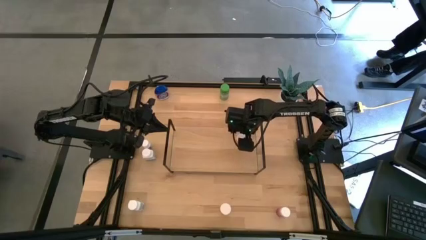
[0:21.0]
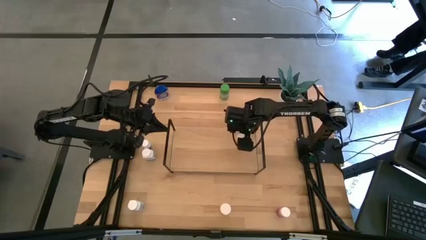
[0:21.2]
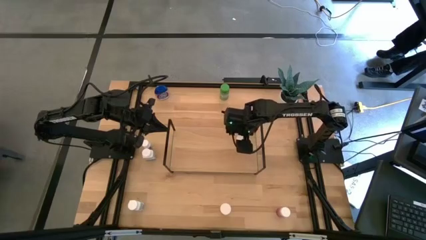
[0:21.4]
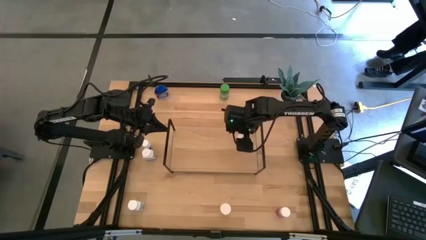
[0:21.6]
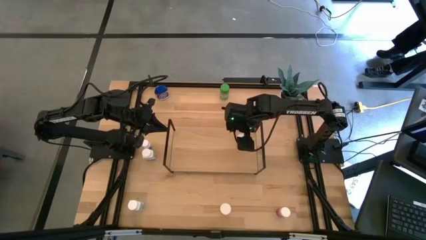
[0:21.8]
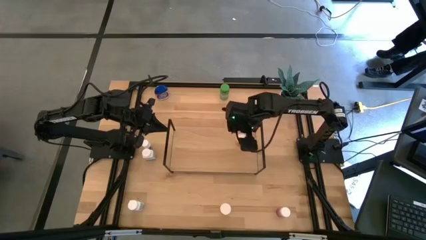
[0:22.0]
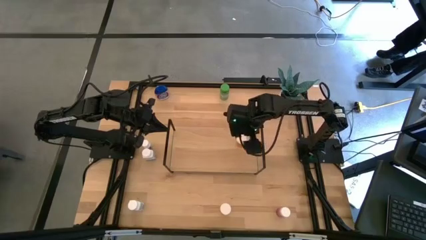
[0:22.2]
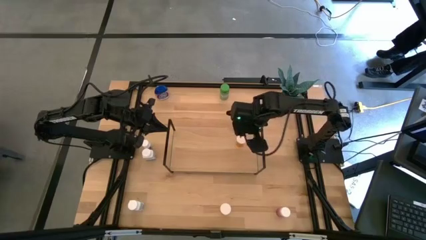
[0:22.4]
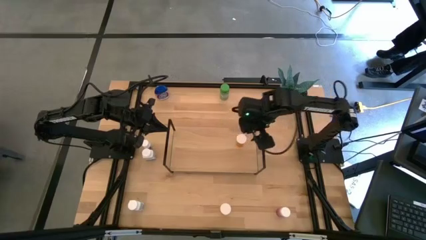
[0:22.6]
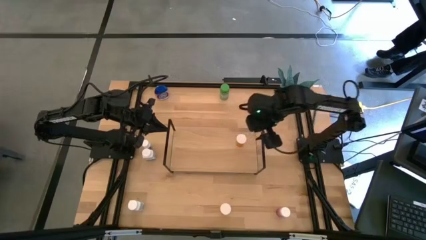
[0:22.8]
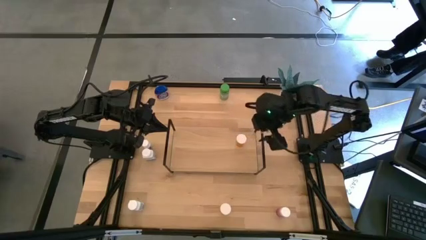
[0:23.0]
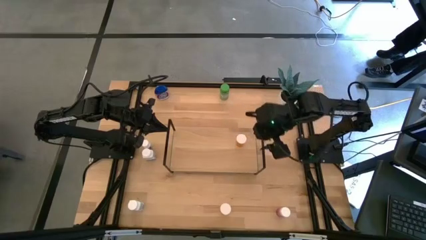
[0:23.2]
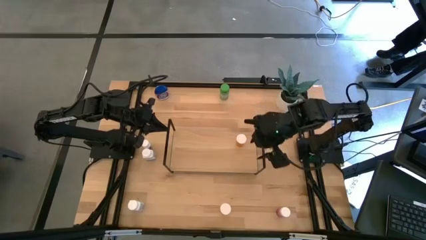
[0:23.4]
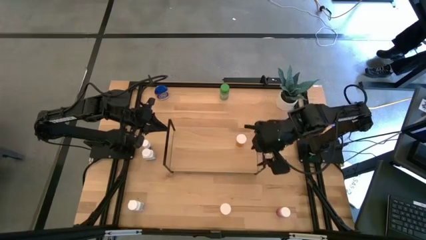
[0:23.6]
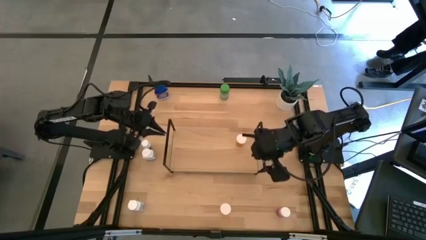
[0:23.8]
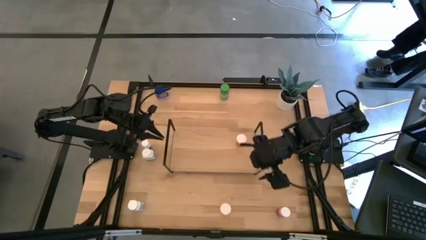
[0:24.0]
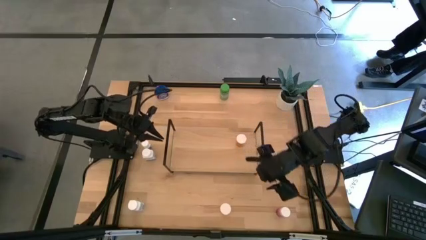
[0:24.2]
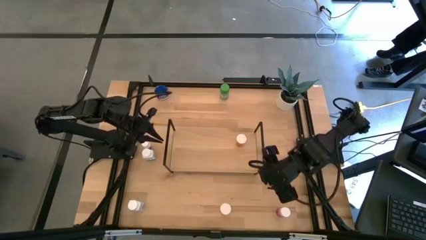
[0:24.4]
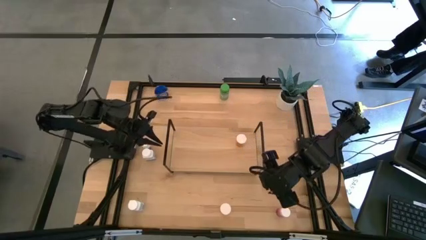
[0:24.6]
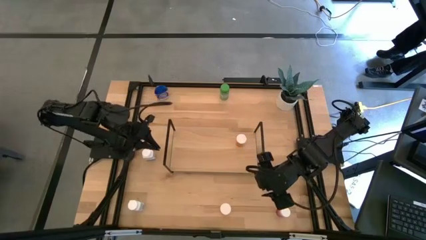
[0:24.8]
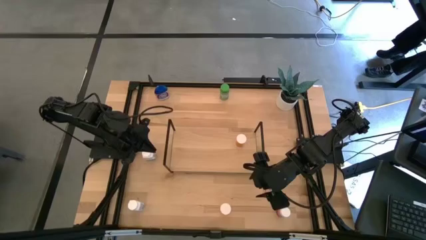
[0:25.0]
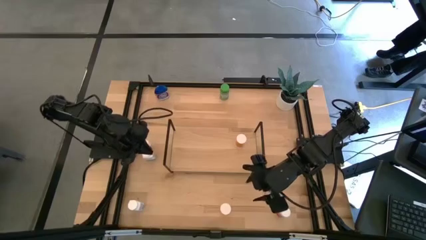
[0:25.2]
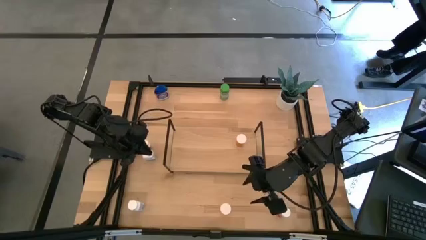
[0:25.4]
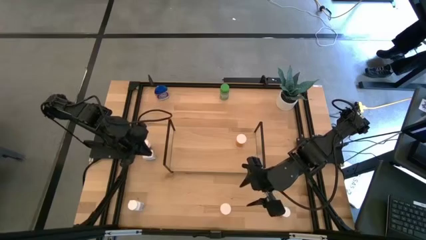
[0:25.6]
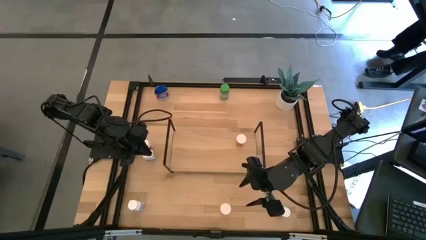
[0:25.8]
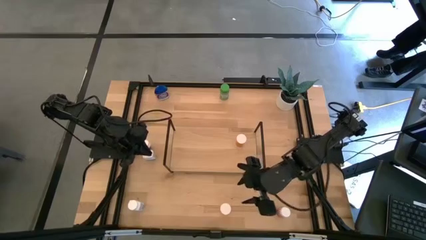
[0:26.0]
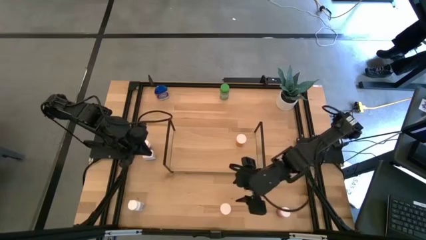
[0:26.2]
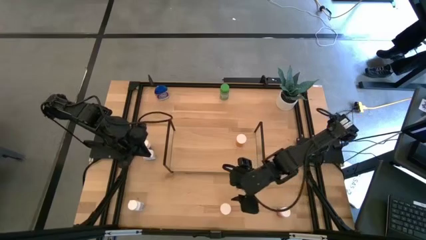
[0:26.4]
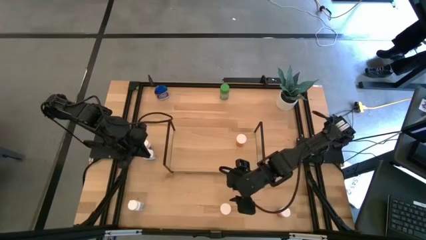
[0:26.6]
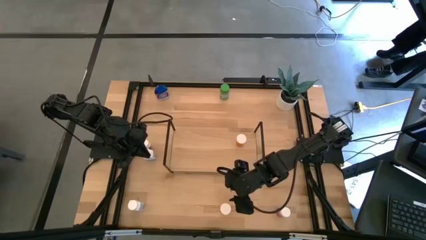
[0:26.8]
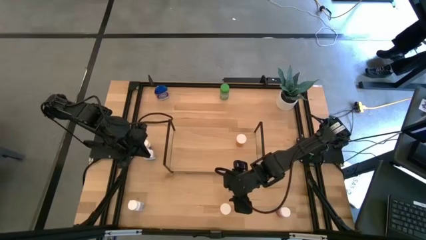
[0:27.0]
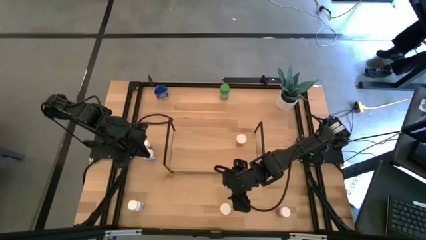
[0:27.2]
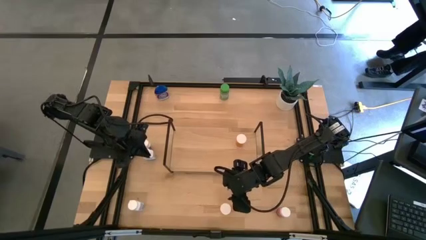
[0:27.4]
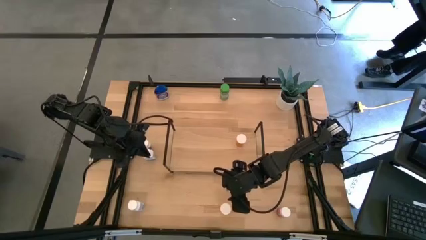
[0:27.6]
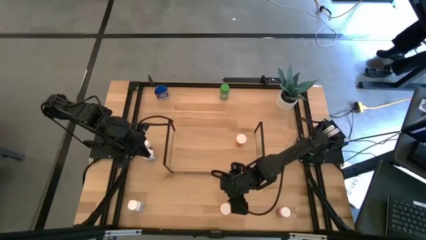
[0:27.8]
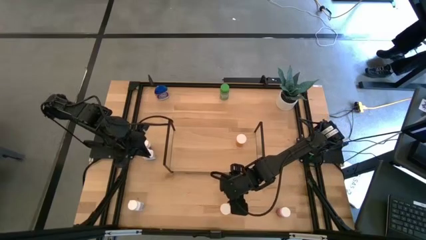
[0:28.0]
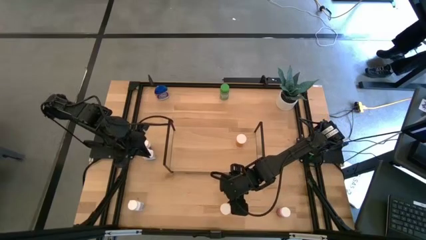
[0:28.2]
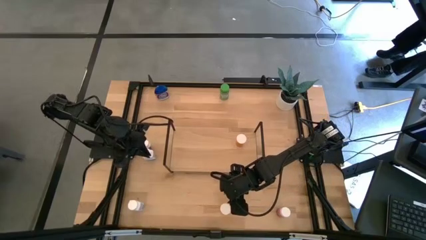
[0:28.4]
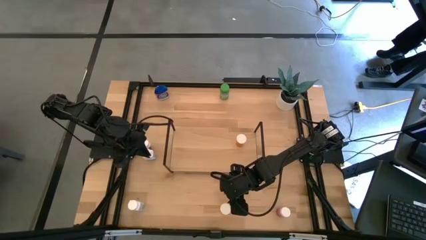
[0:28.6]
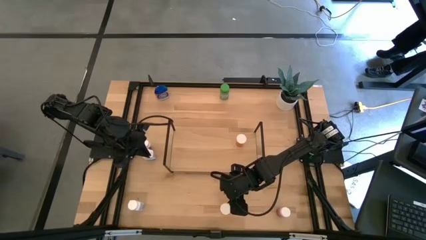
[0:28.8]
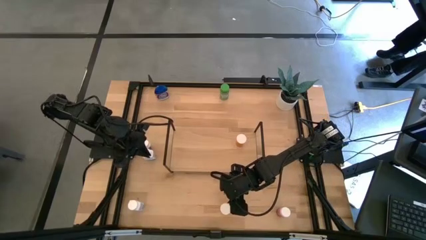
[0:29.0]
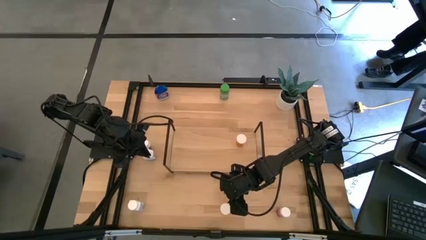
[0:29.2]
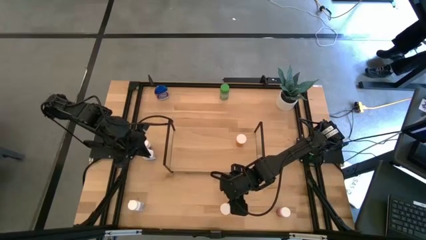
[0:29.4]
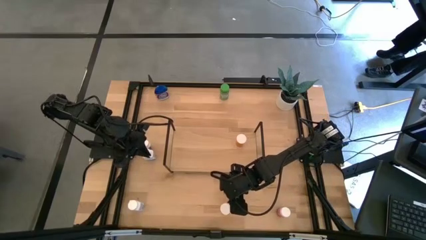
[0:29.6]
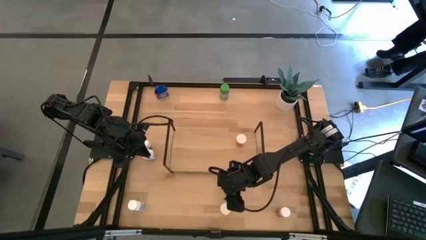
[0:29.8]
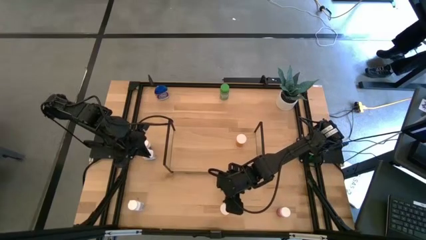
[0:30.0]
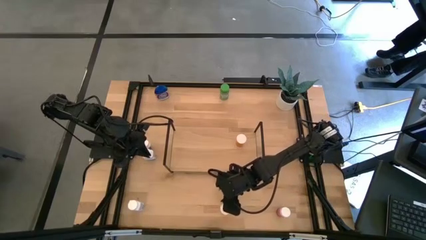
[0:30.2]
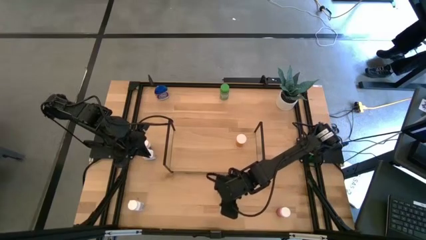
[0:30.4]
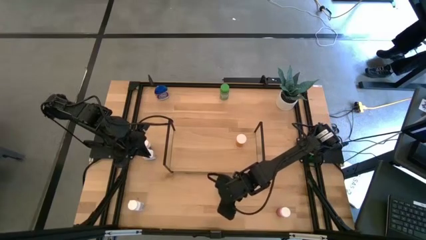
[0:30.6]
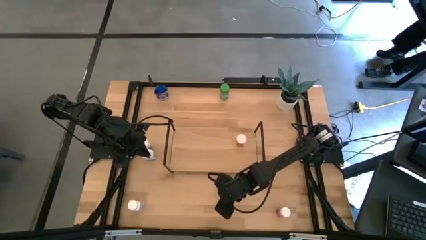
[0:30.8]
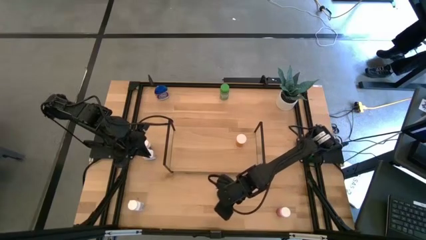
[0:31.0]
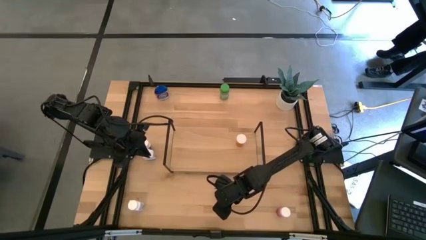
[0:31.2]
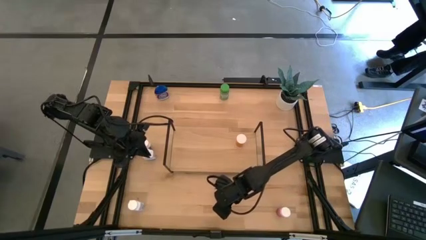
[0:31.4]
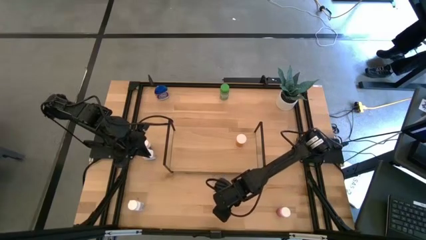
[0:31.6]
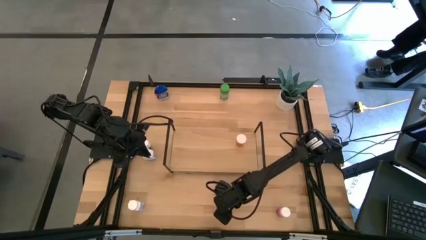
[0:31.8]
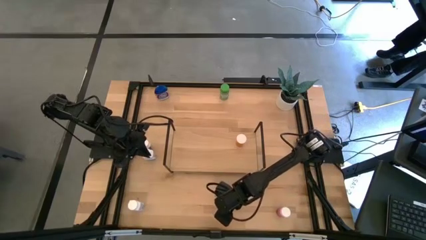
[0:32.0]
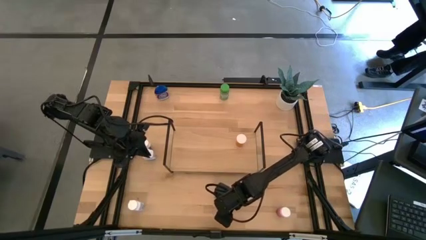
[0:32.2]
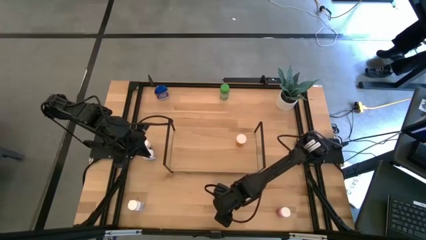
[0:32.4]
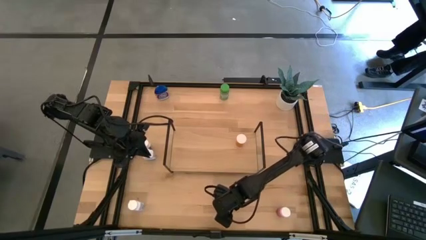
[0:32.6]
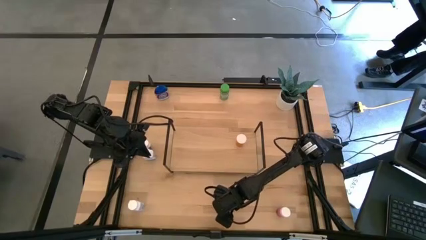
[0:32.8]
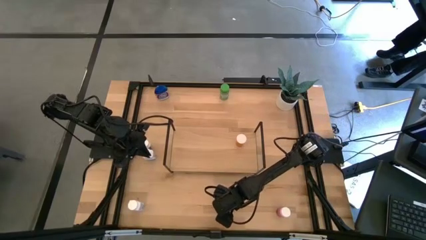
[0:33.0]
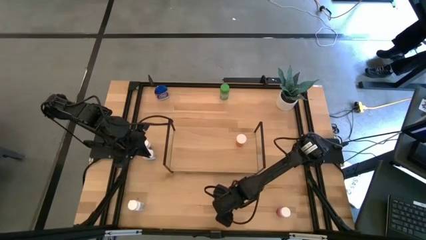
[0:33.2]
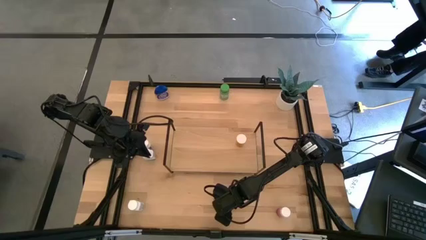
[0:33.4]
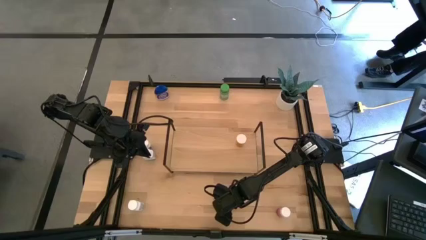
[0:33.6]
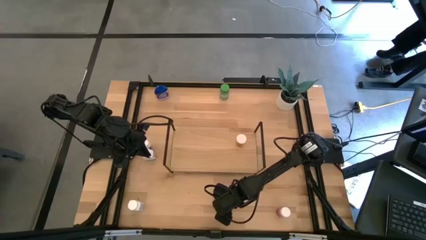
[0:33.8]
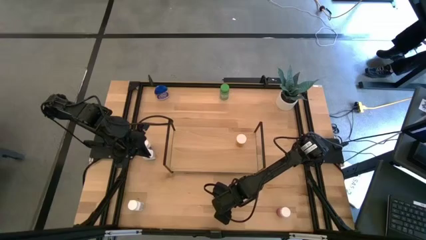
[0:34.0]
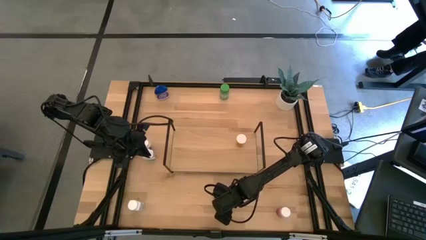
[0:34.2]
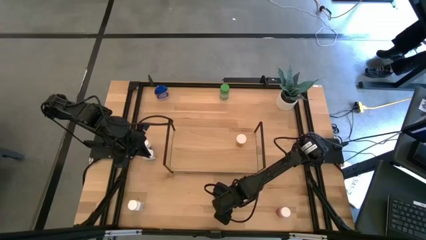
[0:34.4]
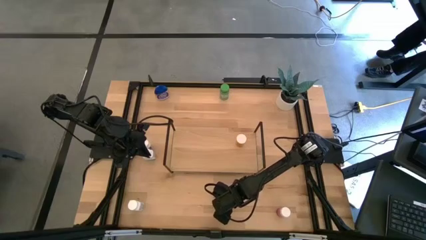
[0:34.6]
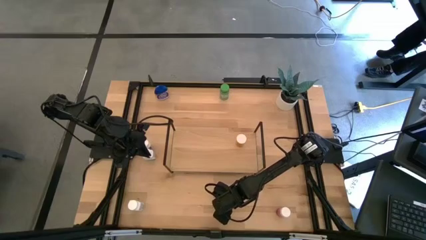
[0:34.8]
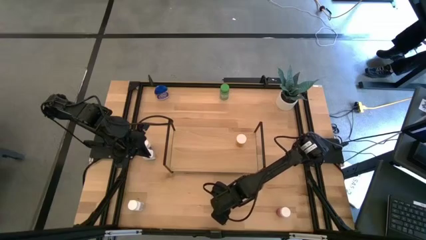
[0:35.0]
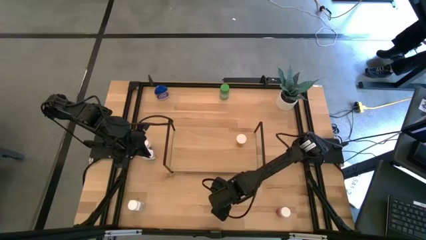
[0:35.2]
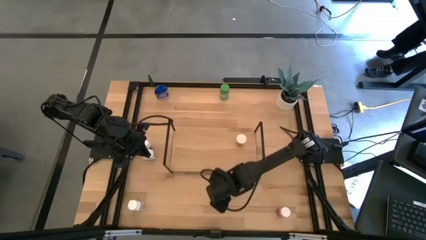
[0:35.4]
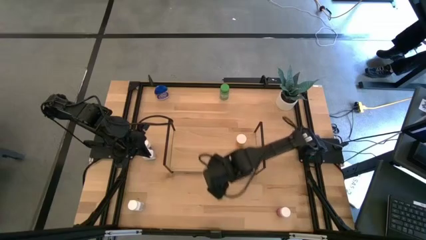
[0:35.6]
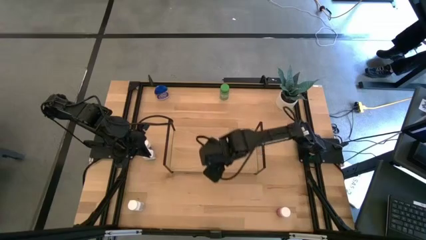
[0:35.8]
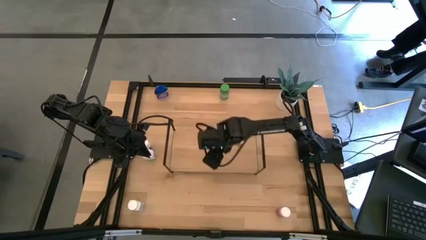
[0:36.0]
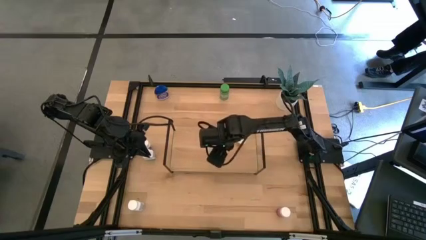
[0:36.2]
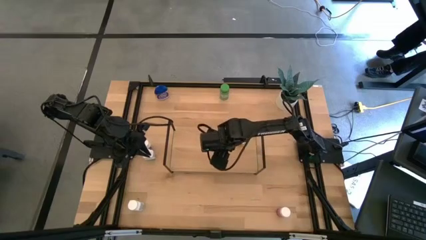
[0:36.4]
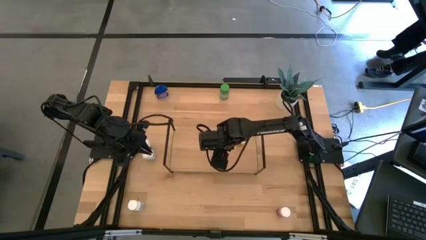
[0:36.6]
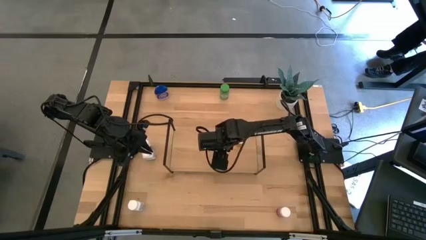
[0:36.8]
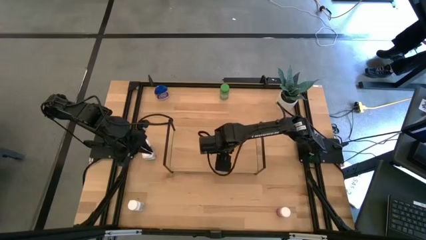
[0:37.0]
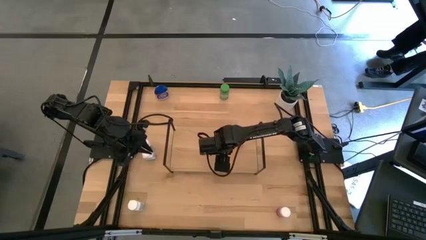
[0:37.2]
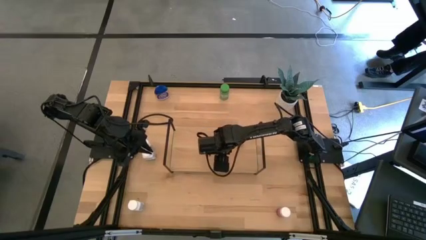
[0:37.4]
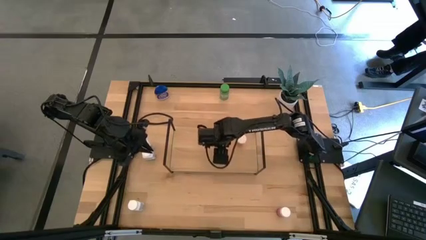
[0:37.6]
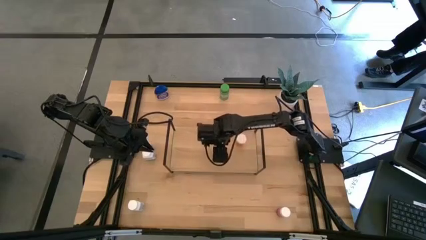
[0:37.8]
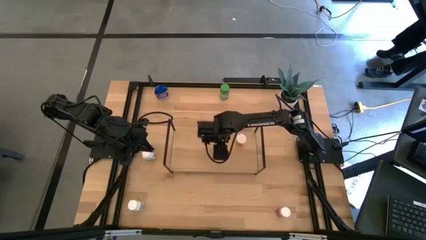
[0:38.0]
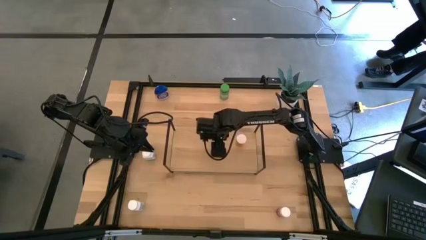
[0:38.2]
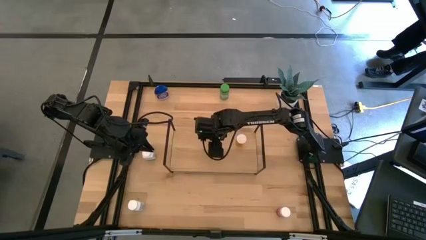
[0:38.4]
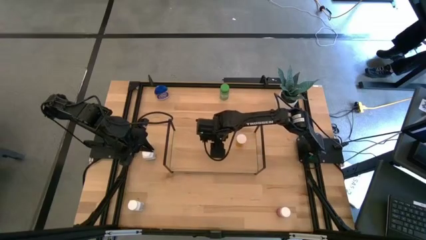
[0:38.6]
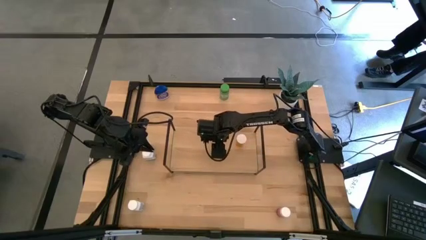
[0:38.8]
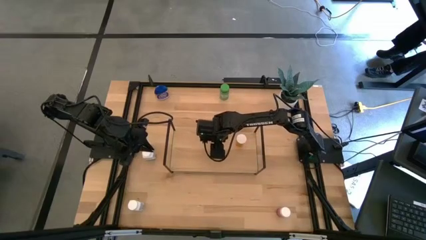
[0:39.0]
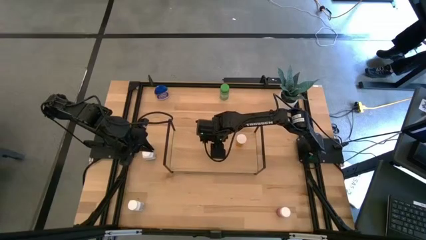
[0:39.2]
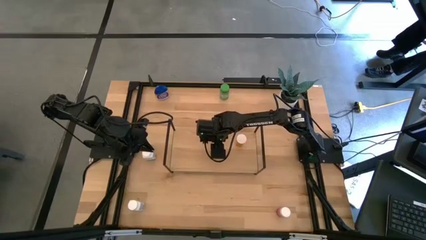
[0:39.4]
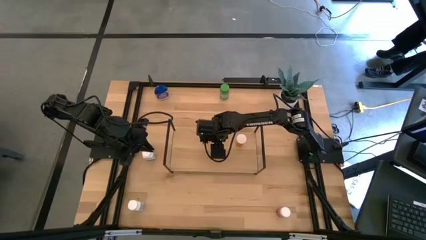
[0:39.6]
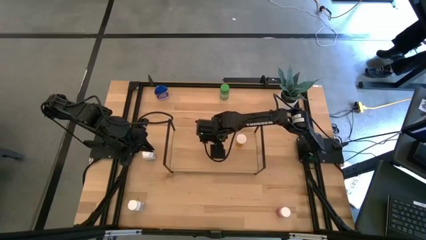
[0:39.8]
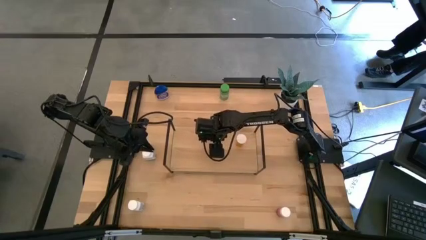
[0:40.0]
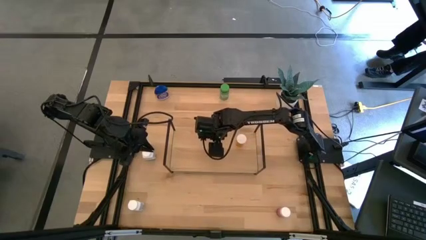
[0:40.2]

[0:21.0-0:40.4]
Task: Pick and place medicine bottles onto shelf by color
Put the orange pill bottle on the shelf
